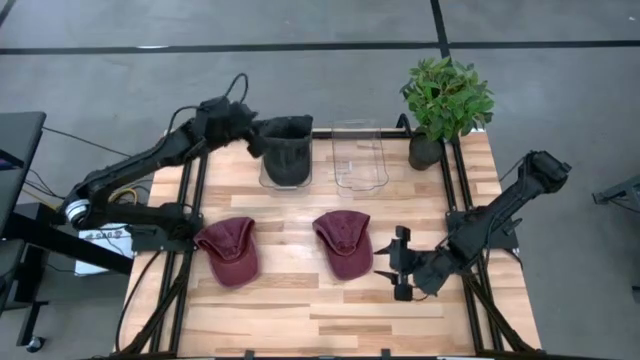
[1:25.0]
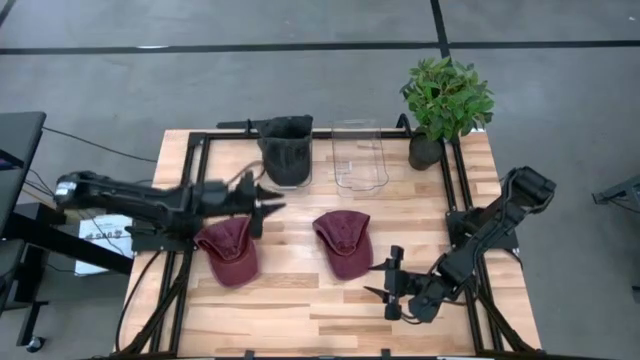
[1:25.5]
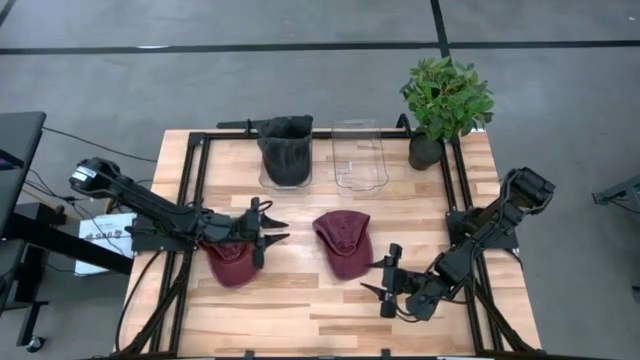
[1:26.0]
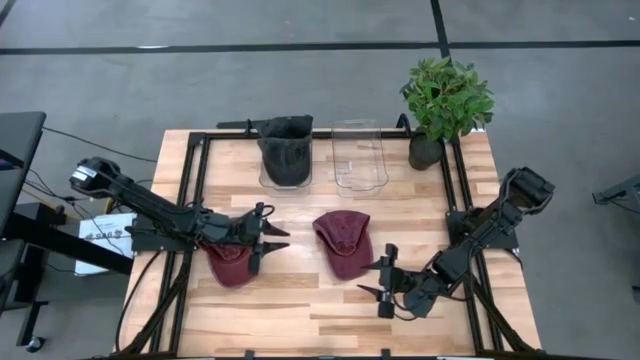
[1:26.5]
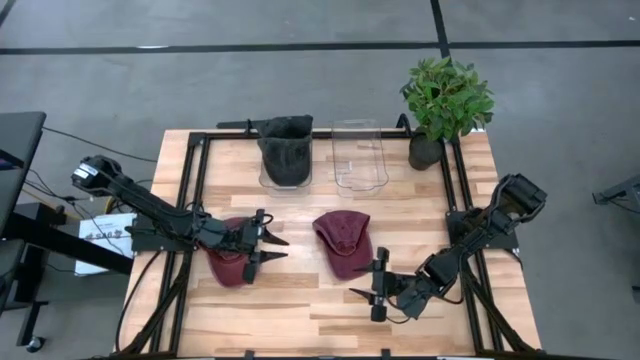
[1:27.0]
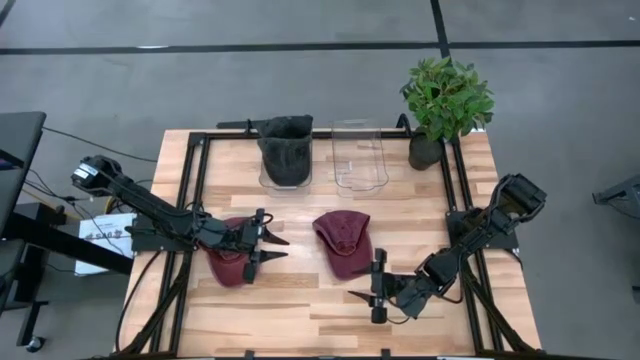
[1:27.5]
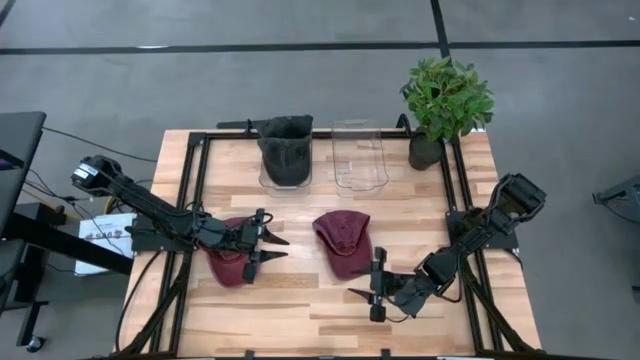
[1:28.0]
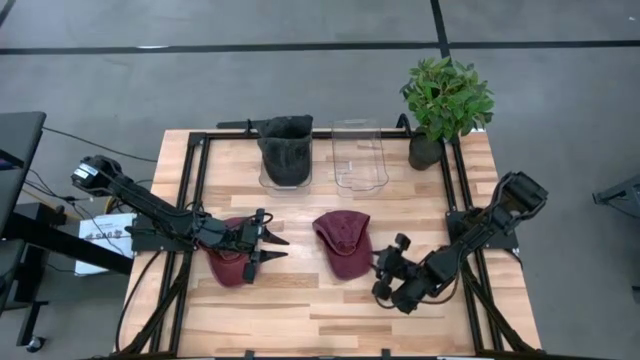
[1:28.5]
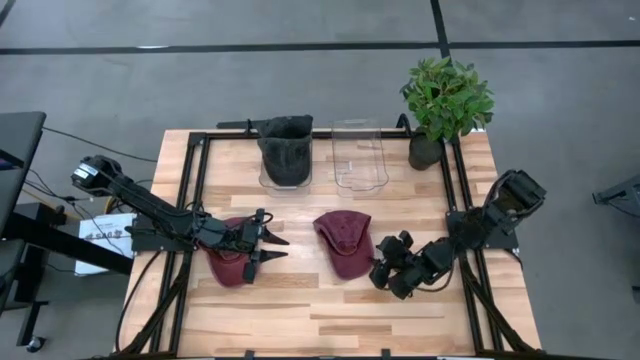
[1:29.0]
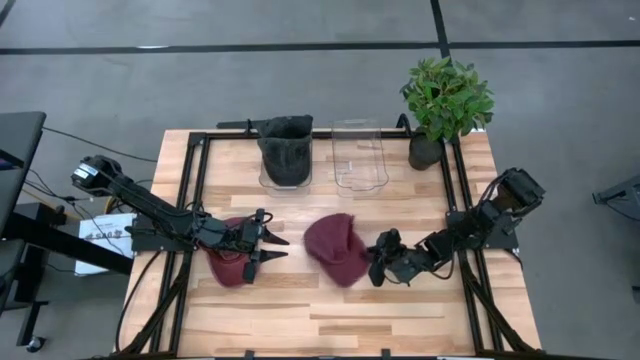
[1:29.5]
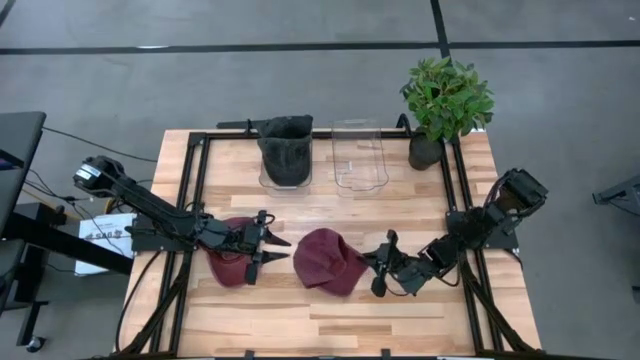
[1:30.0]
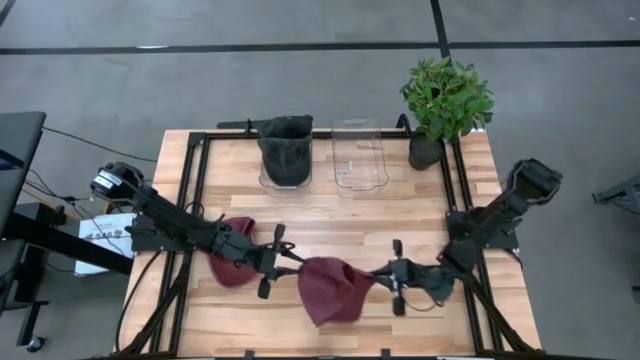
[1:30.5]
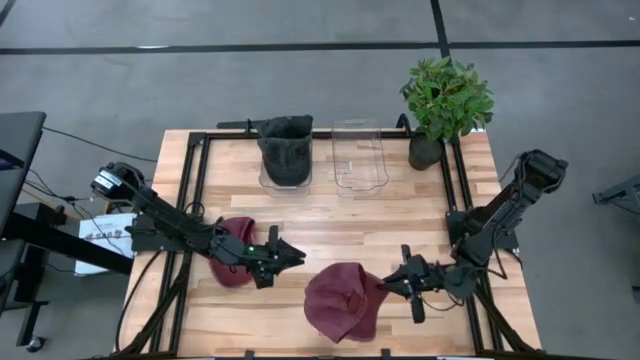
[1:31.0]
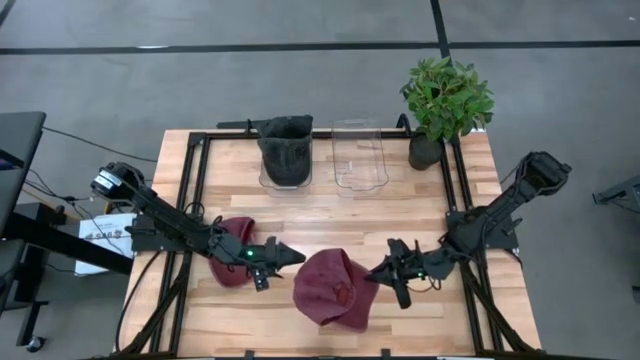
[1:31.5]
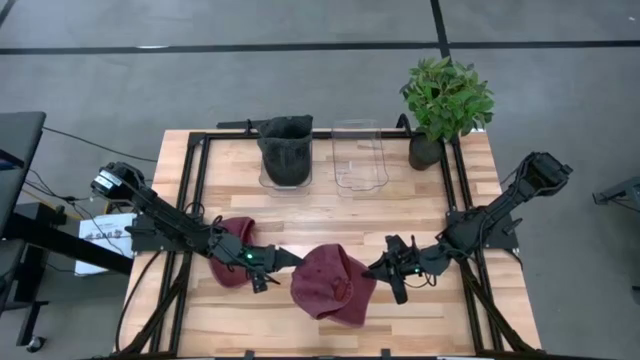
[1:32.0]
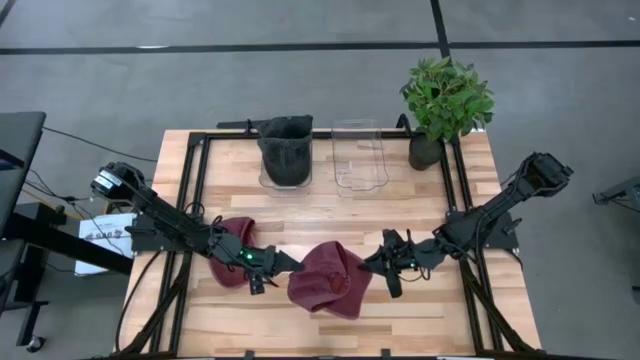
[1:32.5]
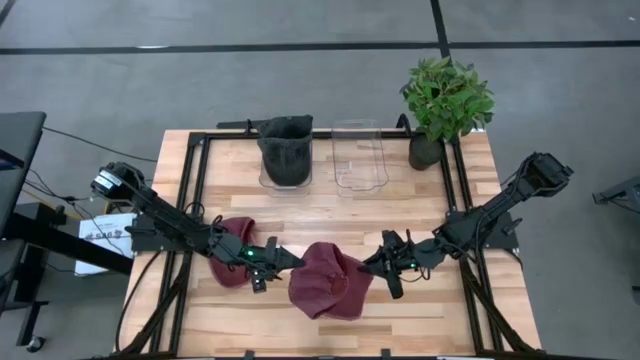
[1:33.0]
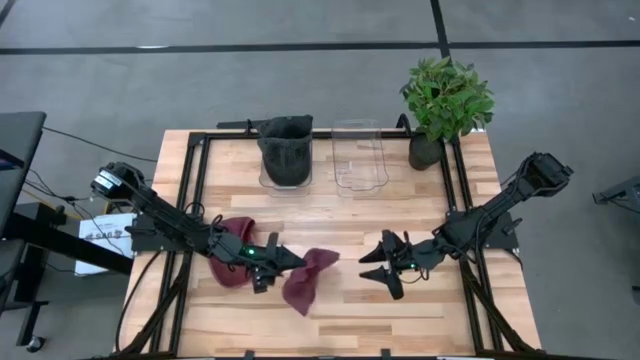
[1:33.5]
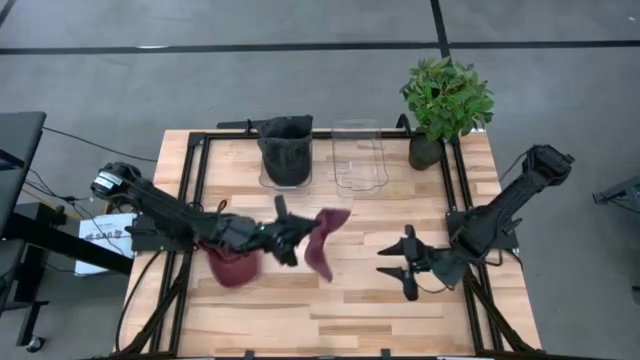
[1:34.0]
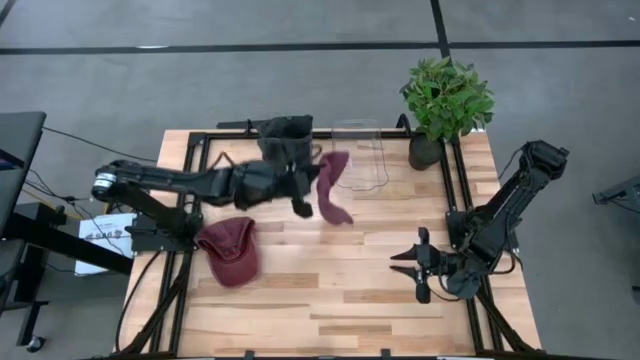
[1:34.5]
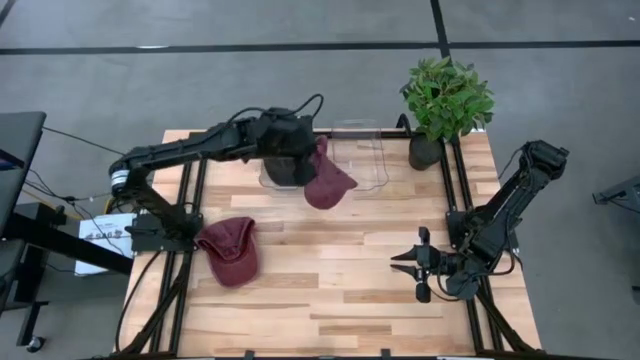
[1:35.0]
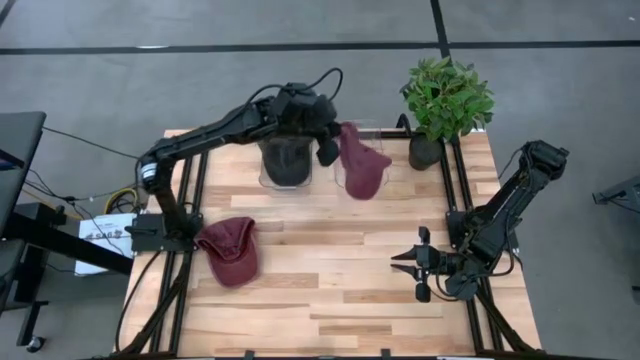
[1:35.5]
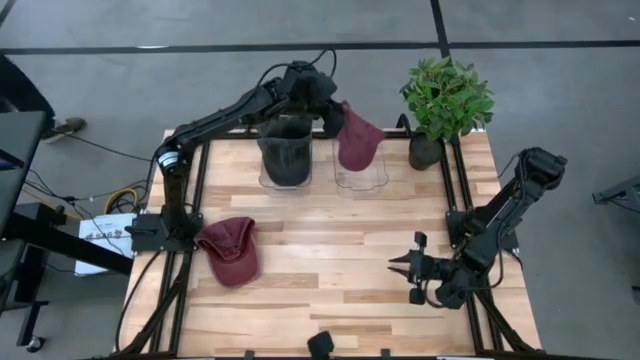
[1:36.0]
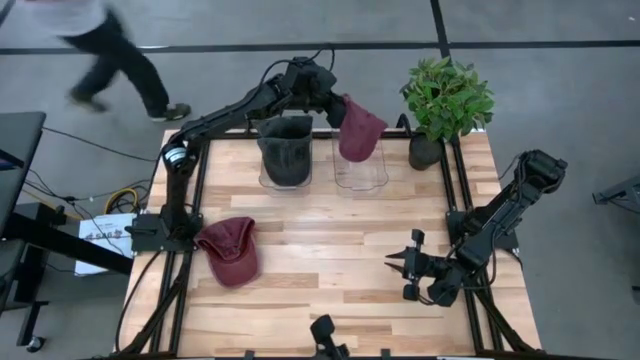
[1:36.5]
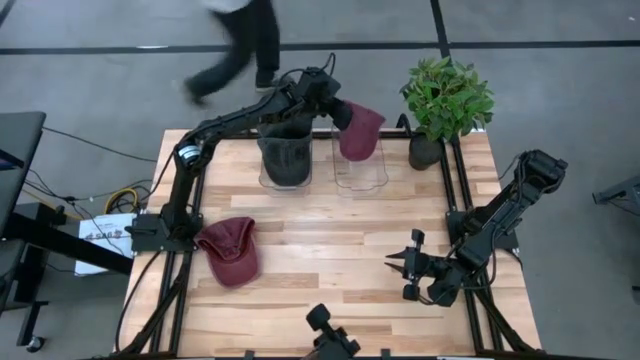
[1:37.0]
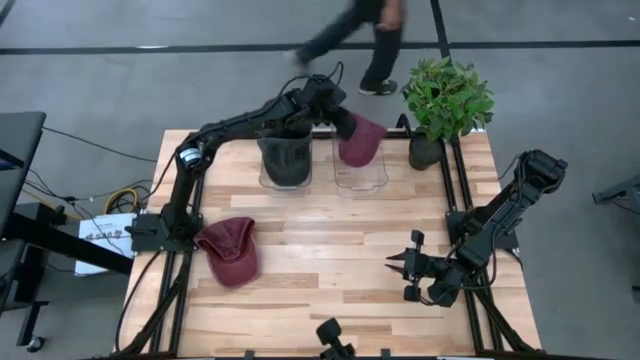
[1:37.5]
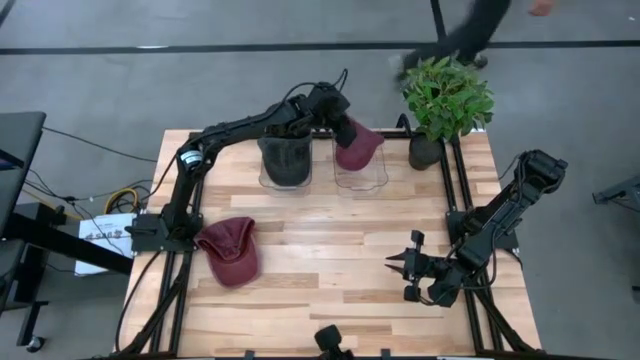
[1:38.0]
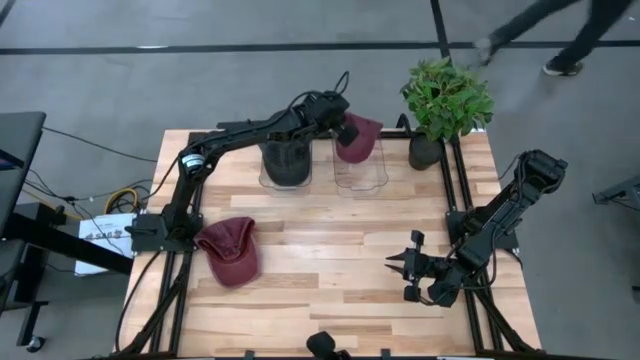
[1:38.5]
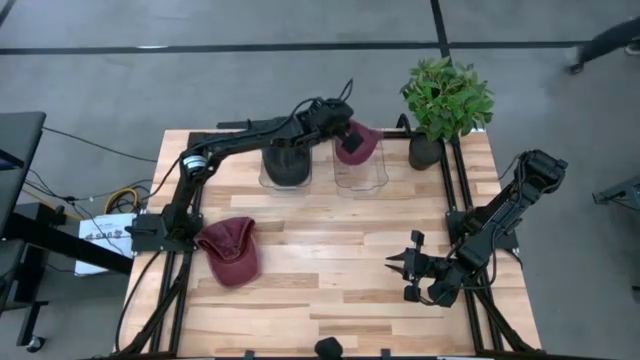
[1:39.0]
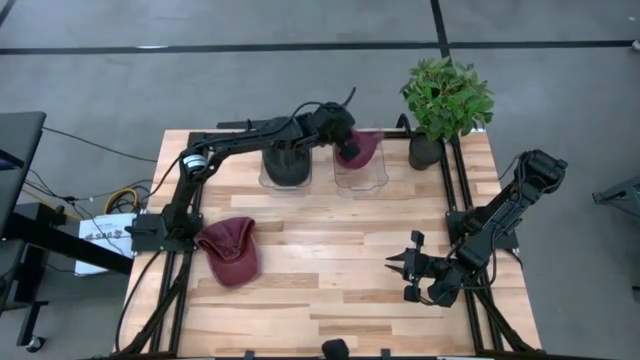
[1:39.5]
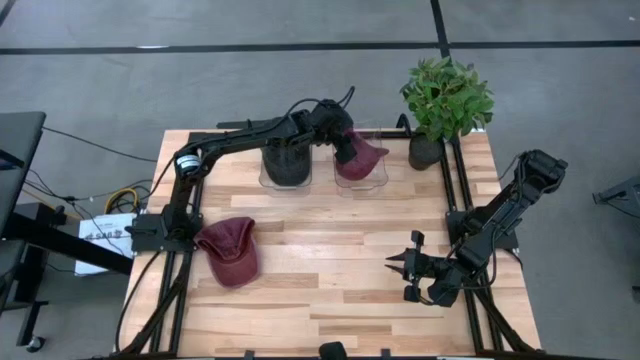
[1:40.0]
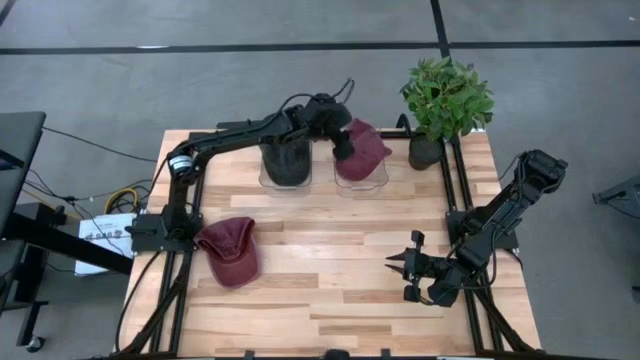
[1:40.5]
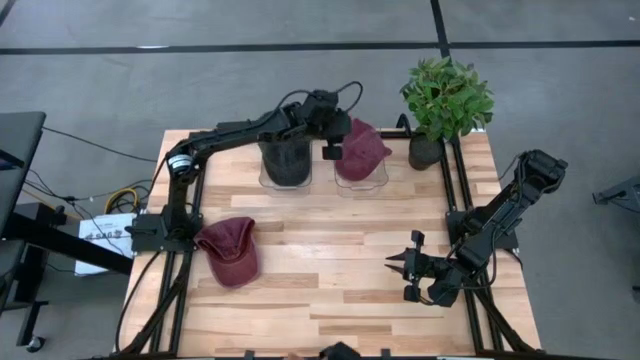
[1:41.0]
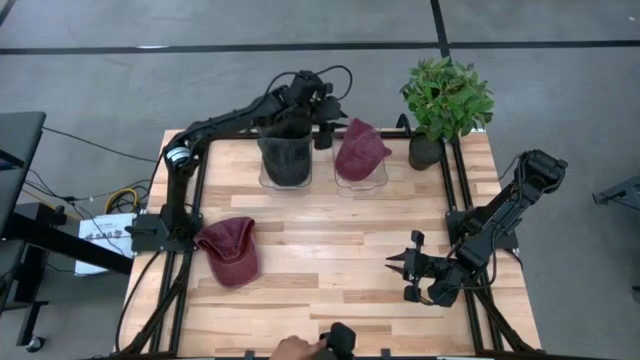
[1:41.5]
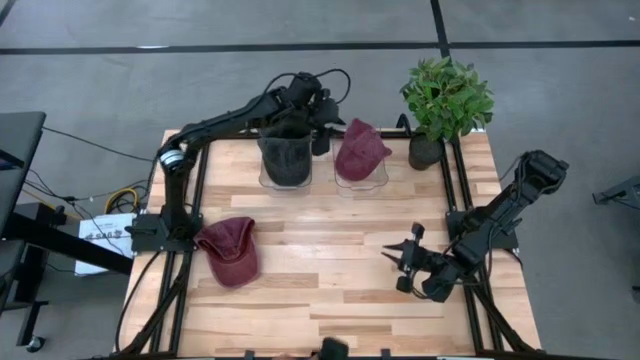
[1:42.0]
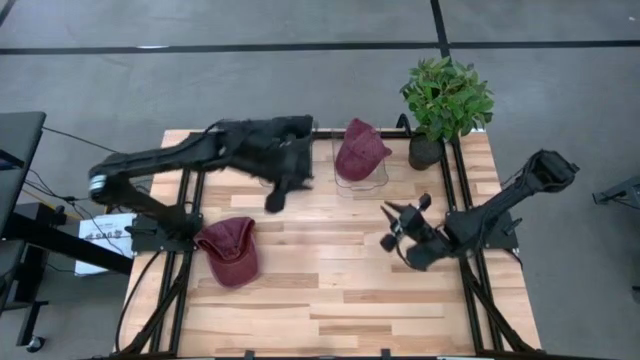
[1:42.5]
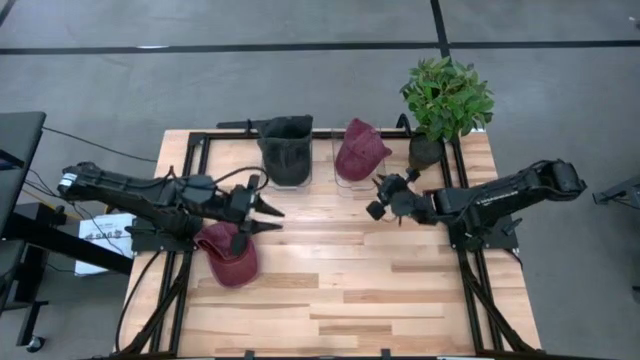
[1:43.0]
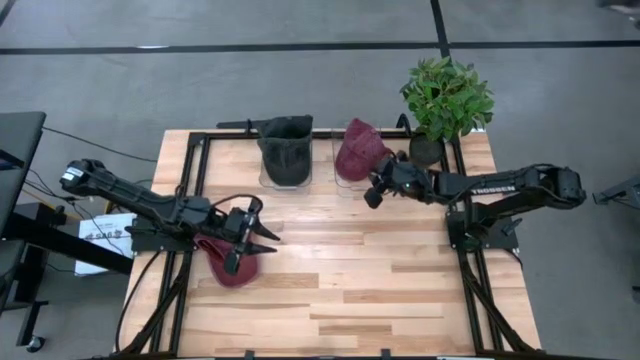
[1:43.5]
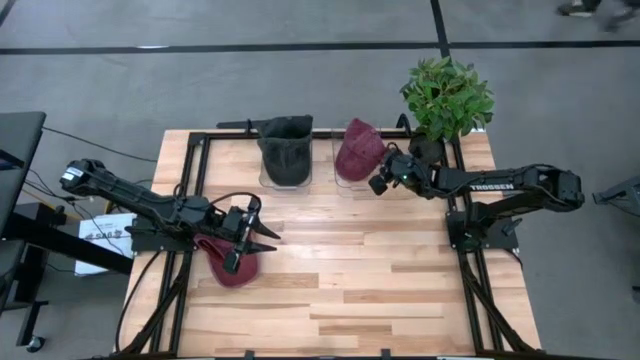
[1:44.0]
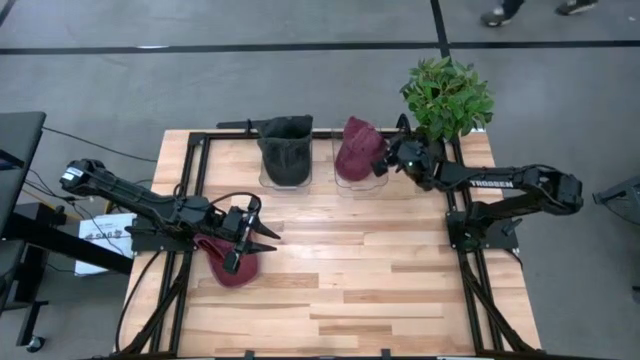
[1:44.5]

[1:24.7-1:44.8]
Task: Pick & Place hat
Put the right red cap into the right transparent bin

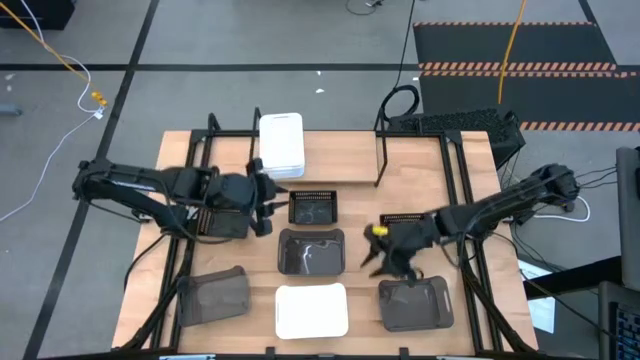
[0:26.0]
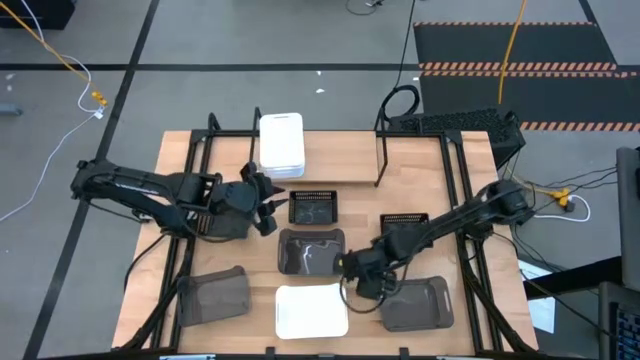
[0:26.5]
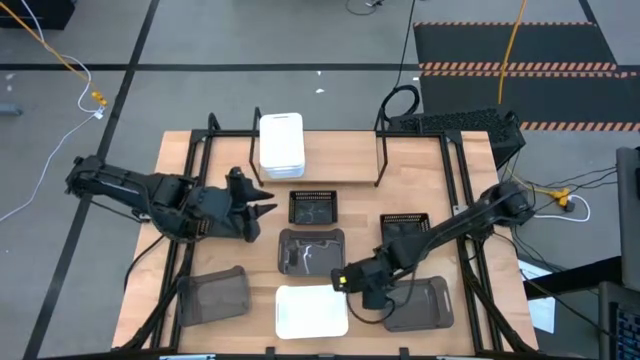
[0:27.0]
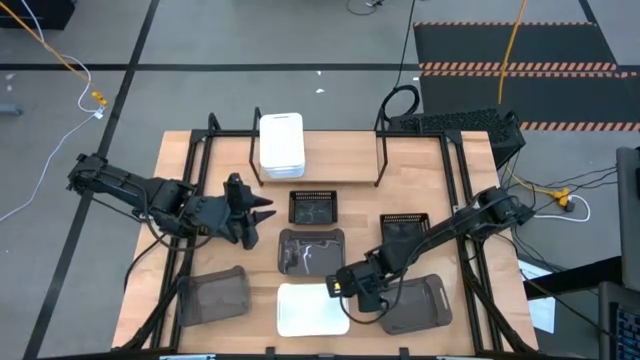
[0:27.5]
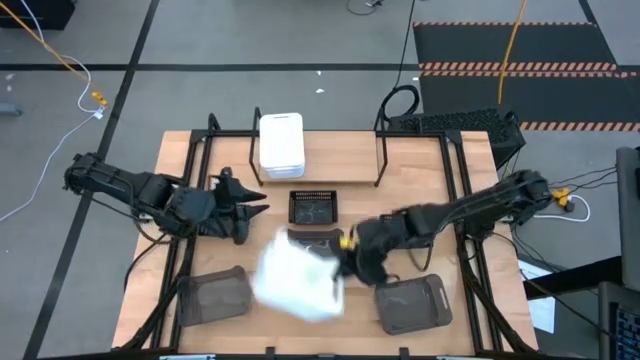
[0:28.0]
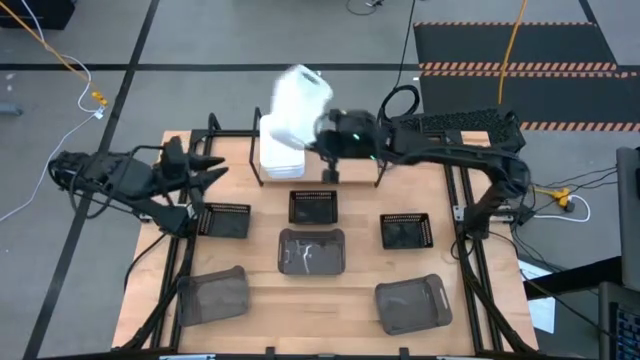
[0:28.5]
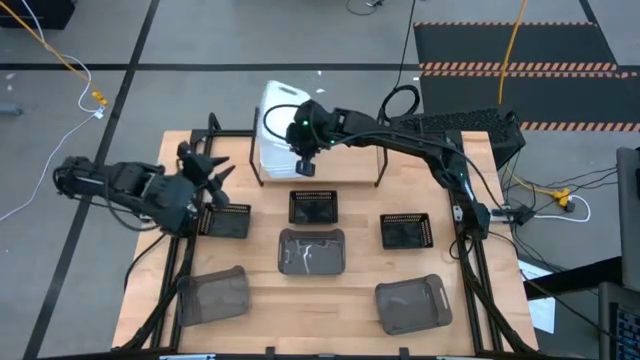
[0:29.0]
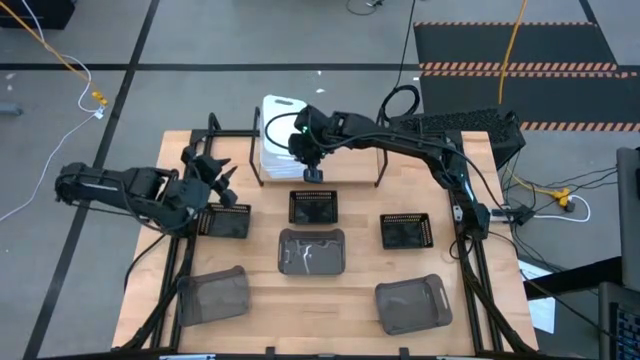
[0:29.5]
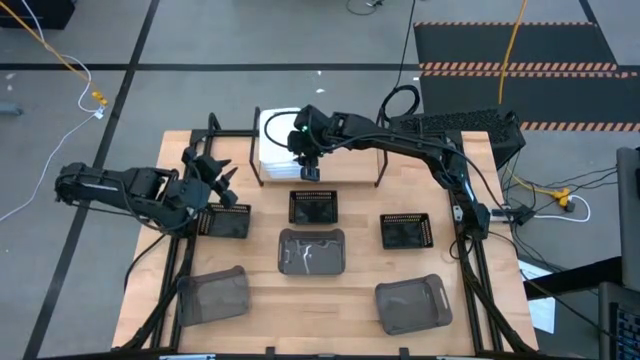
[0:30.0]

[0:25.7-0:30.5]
Task: Stack baskets on shelf by color
Stack the white bin on top of the other white bin on the shelf
